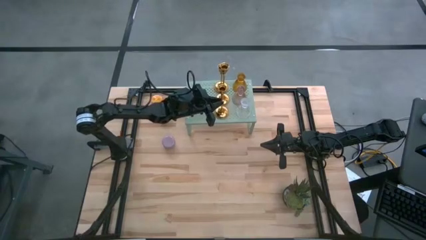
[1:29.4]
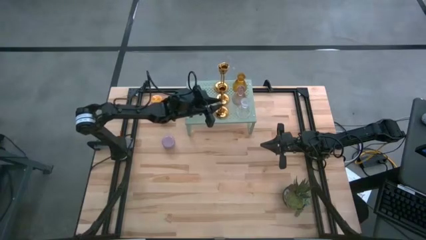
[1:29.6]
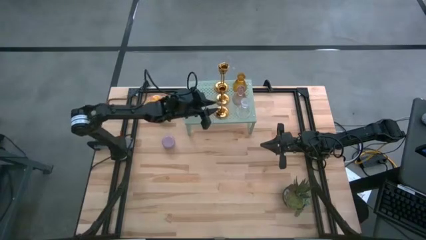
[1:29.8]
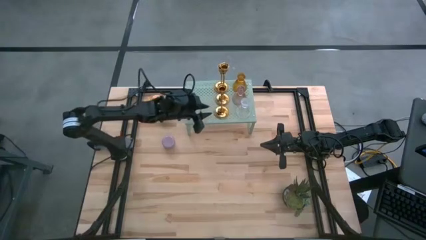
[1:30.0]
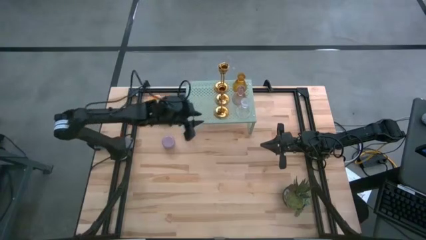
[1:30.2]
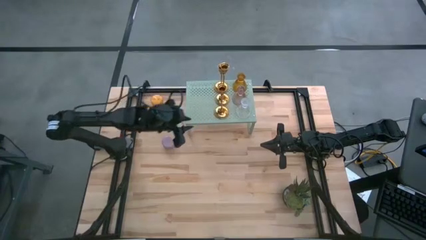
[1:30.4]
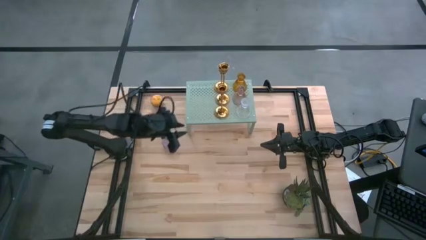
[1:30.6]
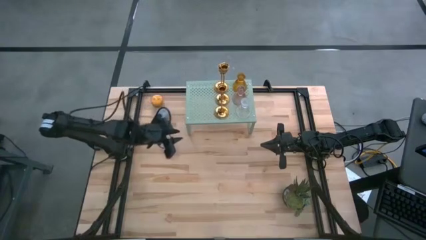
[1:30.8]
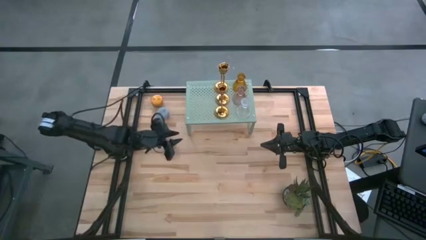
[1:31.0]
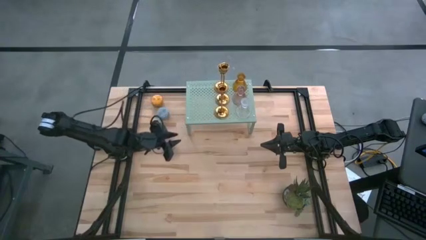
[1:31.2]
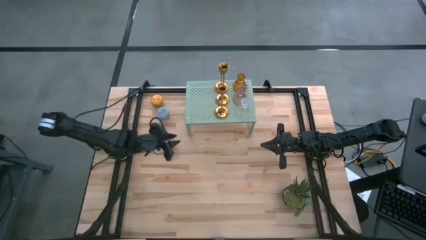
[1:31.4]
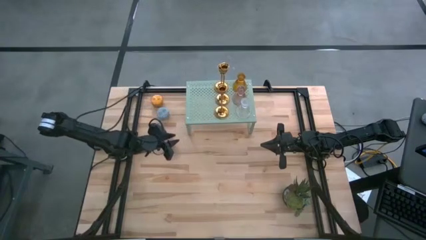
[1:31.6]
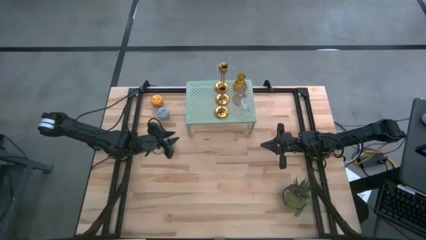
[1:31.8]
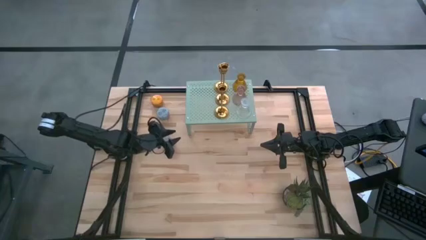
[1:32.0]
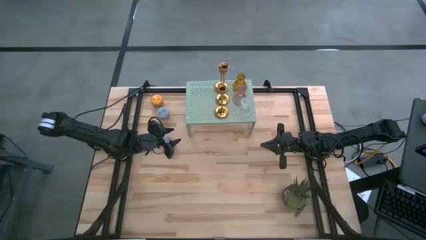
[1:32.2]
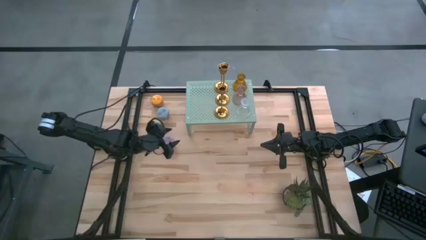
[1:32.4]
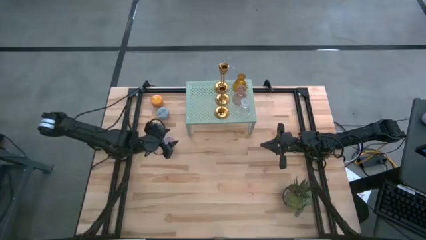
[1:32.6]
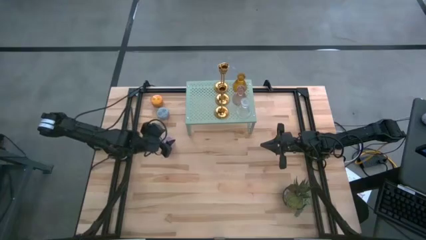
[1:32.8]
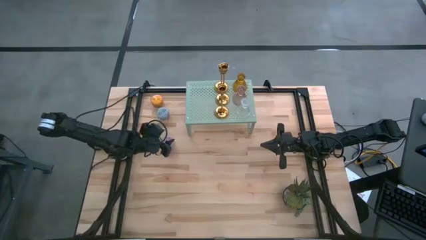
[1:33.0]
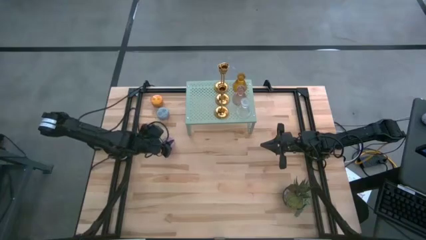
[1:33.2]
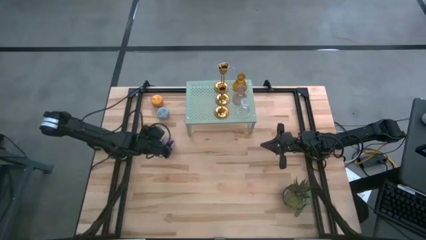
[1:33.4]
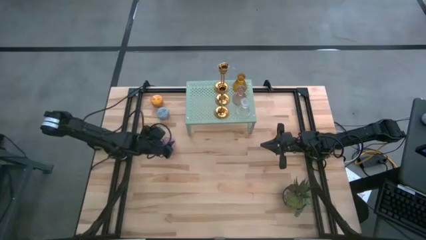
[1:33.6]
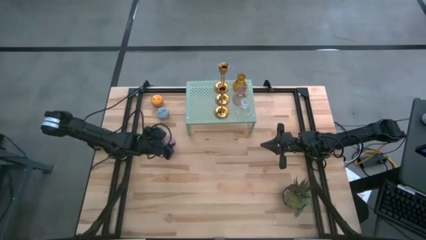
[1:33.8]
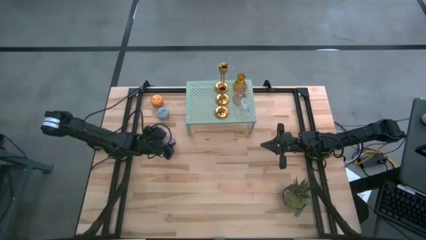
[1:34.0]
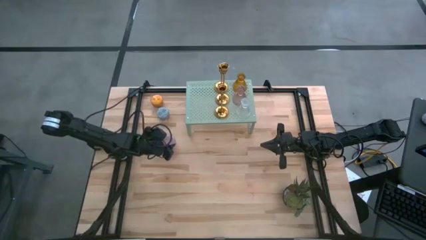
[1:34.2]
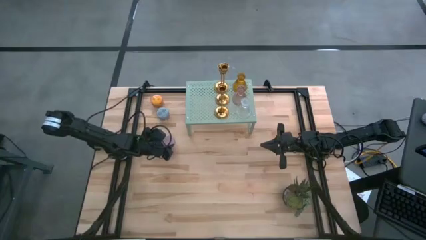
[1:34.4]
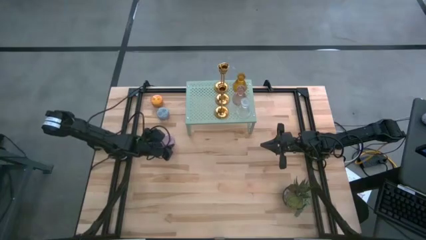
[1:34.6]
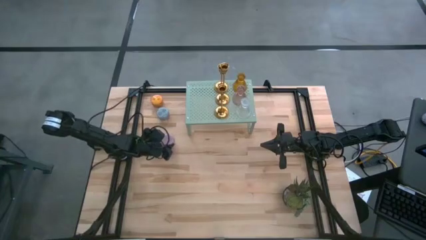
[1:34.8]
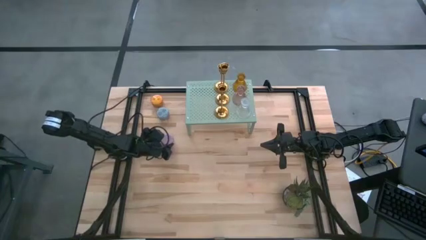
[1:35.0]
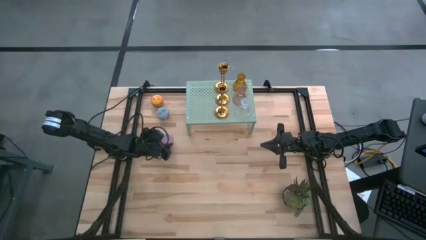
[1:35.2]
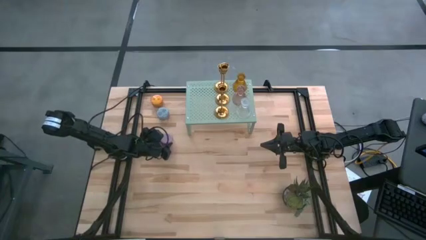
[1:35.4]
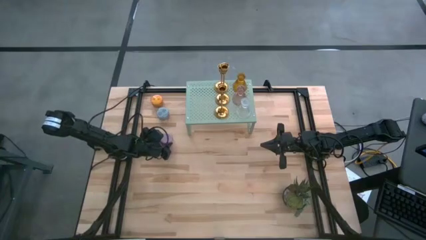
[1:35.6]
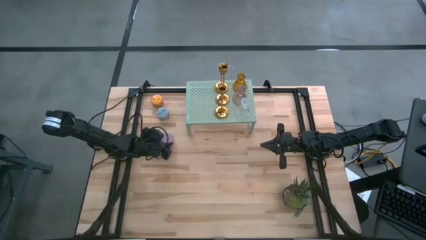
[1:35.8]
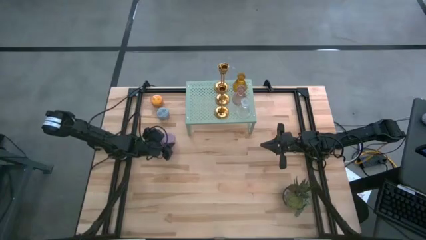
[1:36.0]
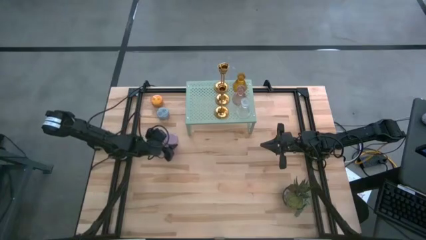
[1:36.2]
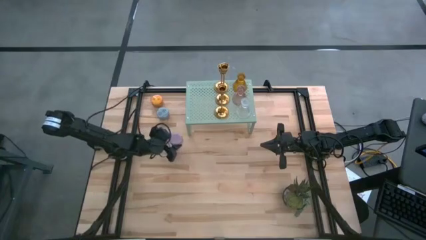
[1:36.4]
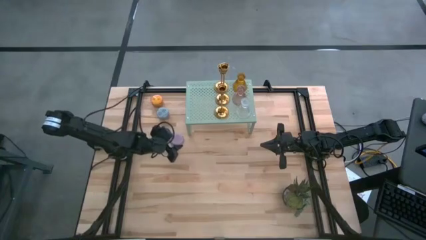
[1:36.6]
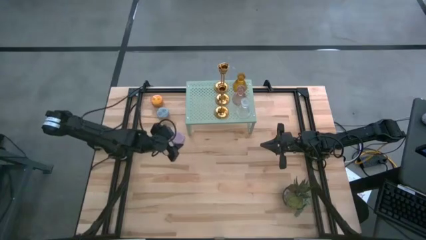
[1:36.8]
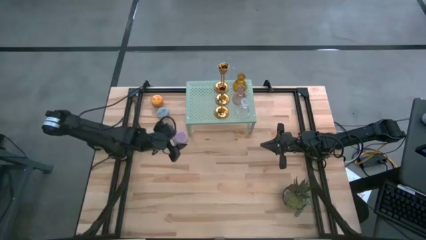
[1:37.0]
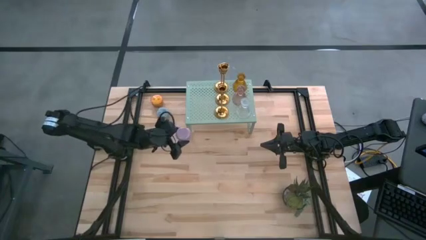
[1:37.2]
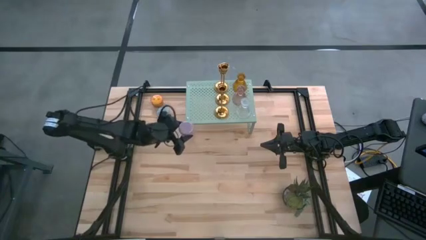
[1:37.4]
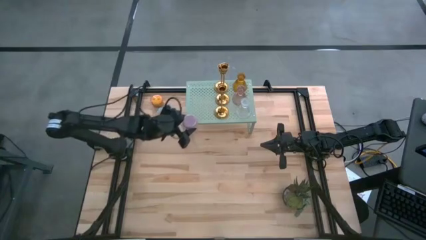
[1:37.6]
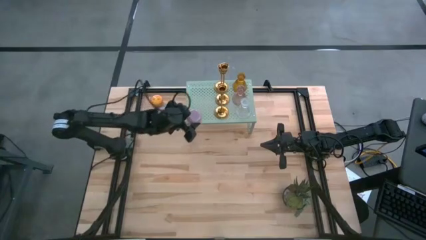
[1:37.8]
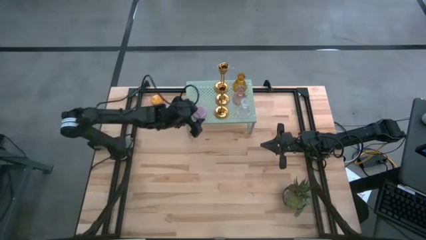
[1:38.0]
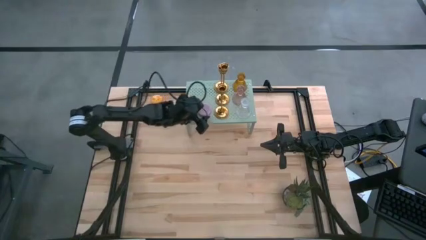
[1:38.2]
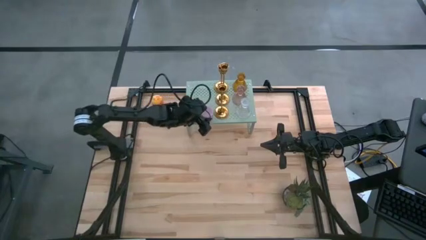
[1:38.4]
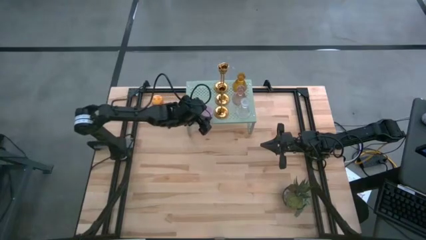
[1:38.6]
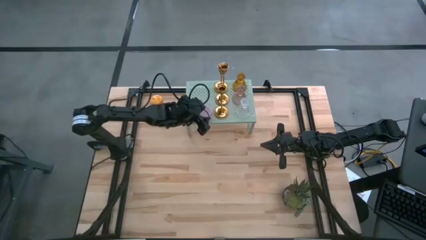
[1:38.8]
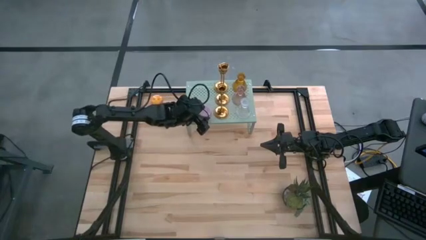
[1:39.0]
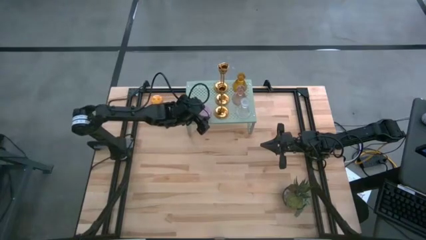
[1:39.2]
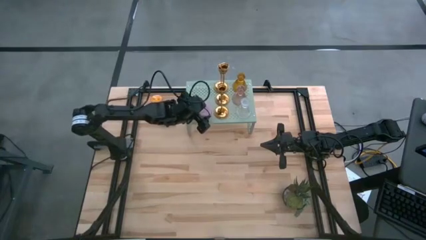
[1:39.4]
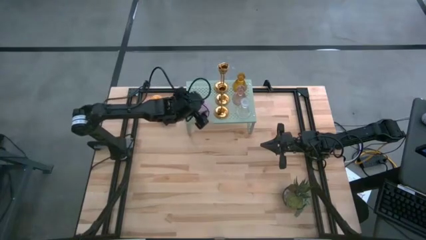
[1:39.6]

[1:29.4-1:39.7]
Task: Pick & Place candle stick holders
Put the purple scented candle on the shelf

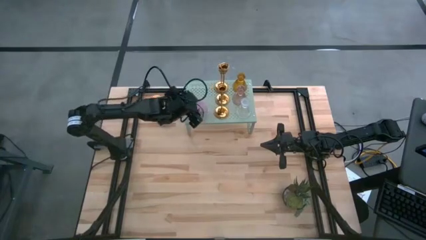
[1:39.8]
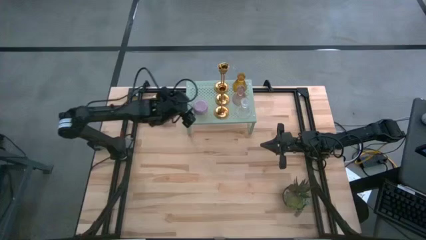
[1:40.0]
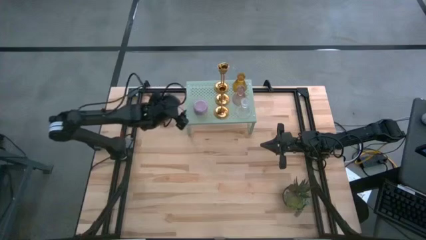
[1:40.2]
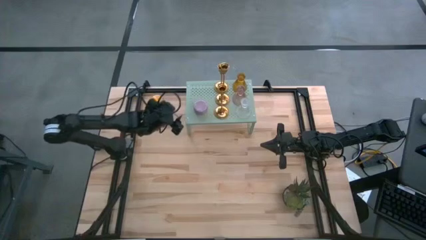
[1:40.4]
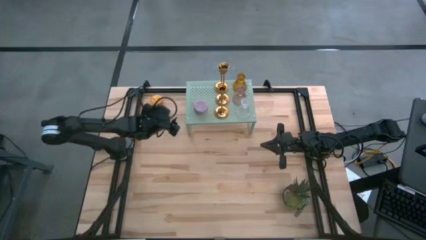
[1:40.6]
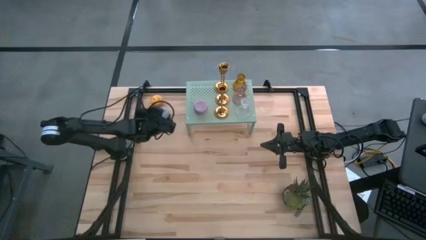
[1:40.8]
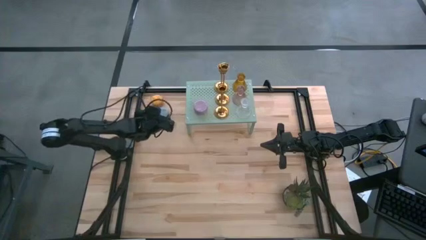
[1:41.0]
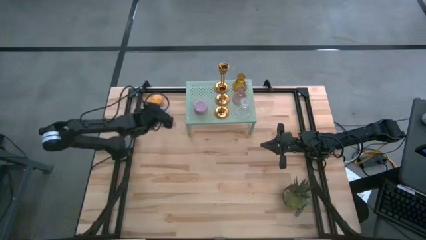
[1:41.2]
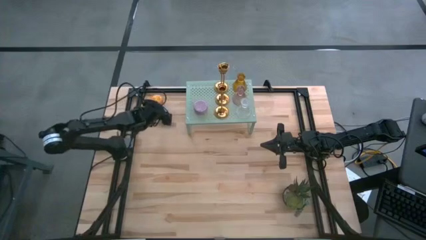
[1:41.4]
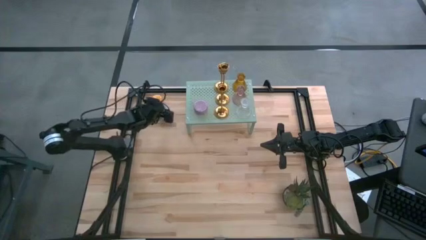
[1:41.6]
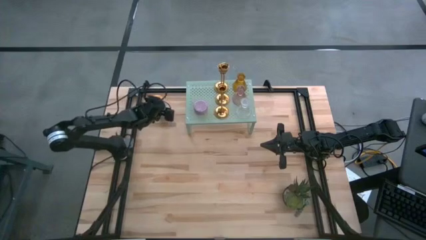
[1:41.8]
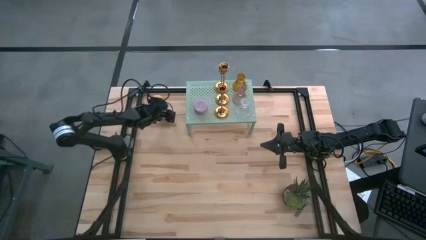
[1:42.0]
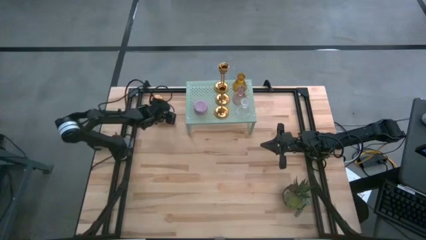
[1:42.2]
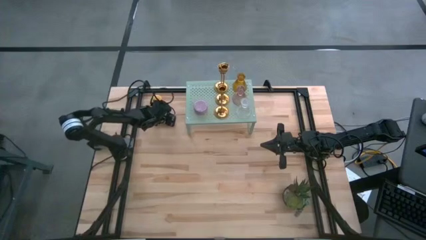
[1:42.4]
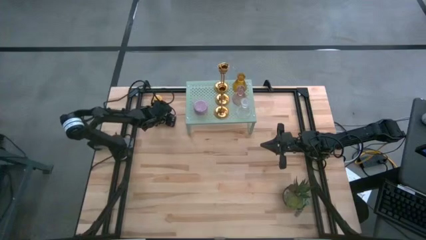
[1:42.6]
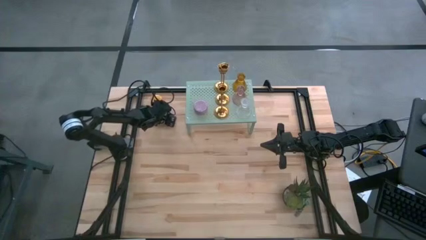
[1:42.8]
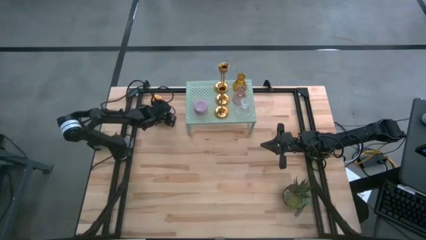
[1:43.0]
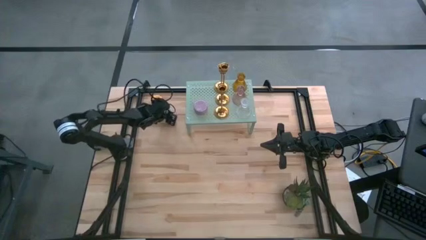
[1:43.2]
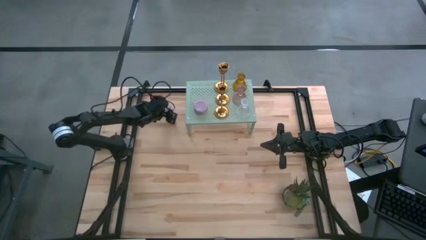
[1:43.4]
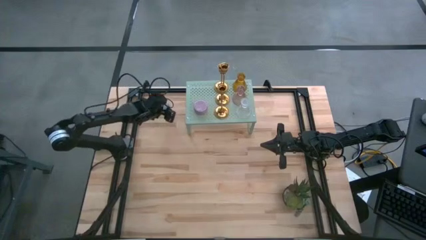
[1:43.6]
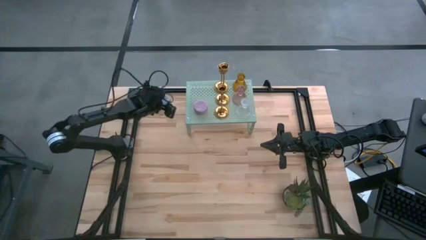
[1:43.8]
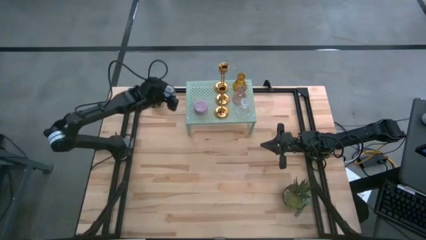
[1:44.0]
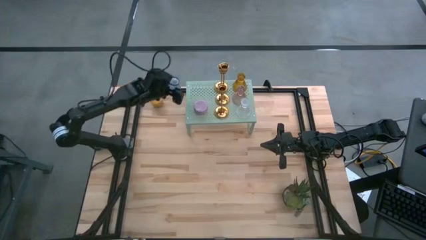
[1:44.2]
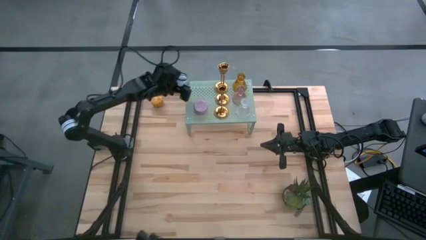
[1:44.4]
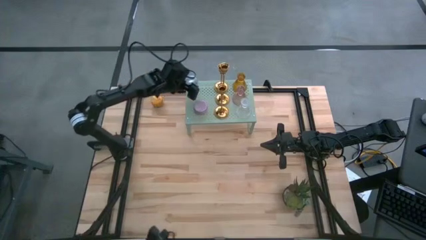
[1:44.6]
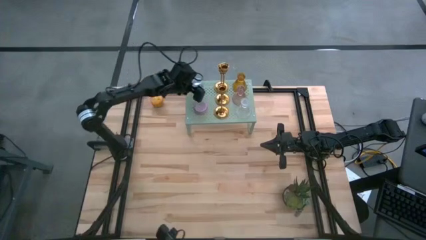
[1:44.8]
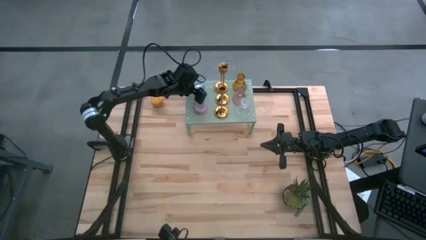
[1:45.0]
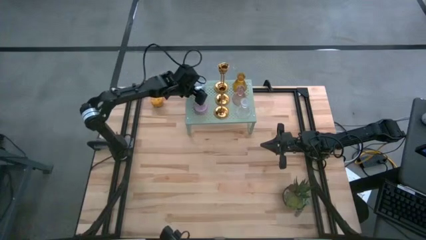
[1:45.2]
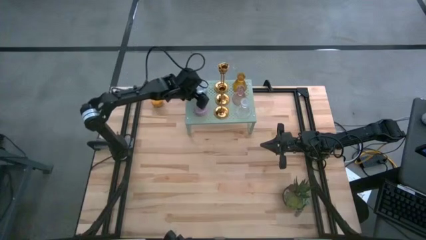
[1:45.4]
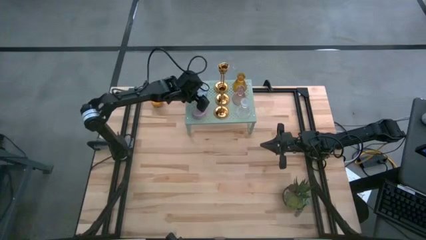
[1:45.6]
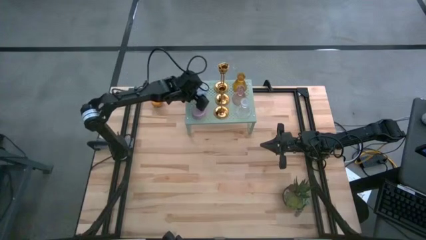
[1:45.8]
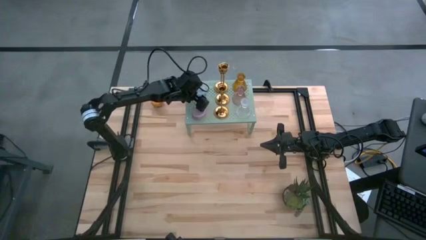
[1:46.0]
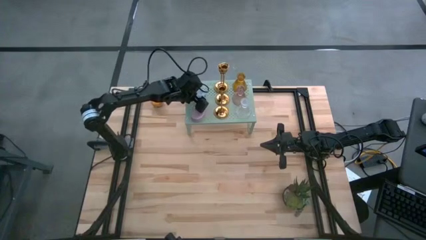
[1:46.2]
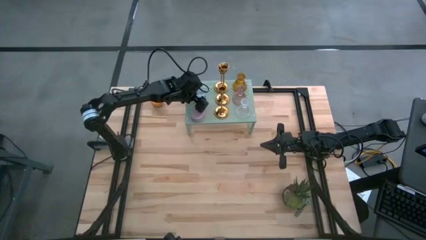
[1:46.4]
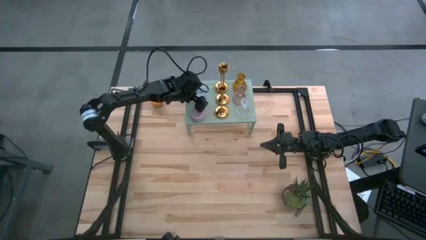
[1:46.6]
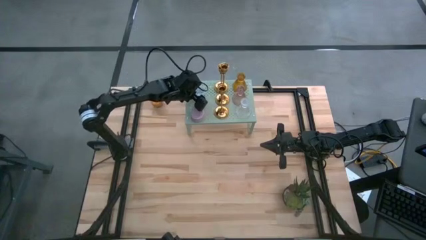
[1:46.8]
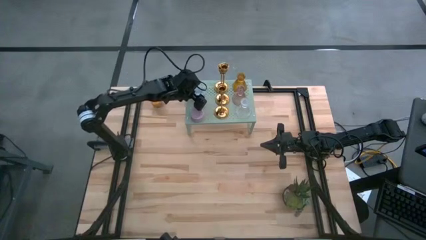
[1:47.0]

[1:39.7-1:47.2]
Put the blue scented candle on the shelf
